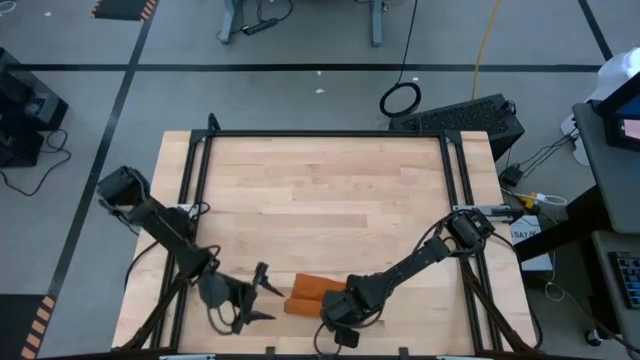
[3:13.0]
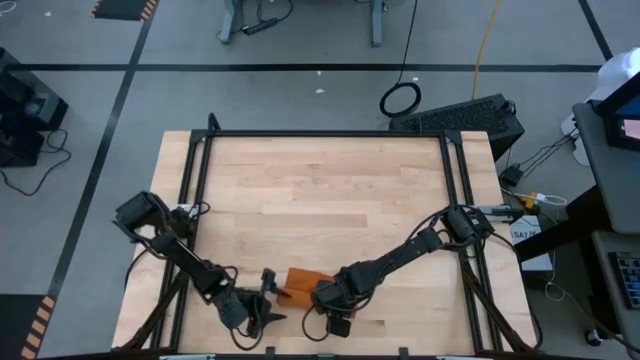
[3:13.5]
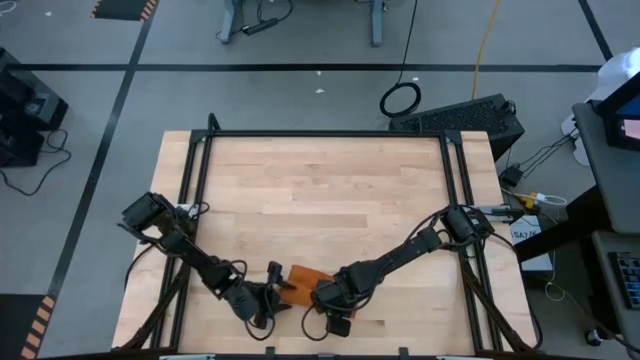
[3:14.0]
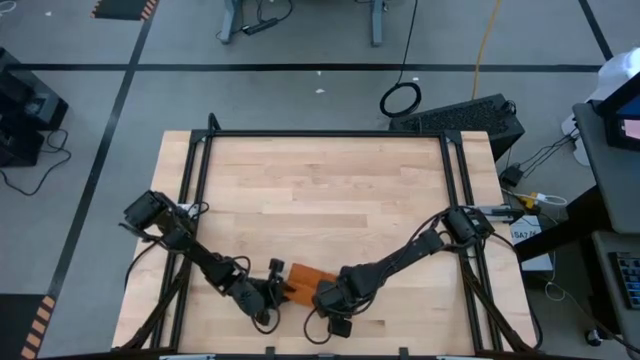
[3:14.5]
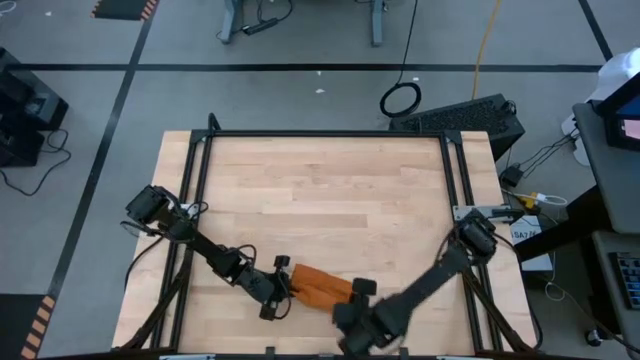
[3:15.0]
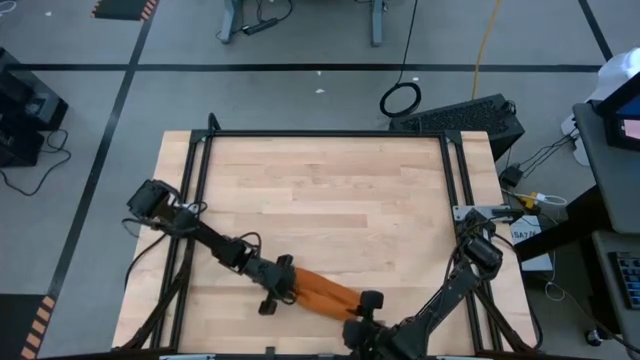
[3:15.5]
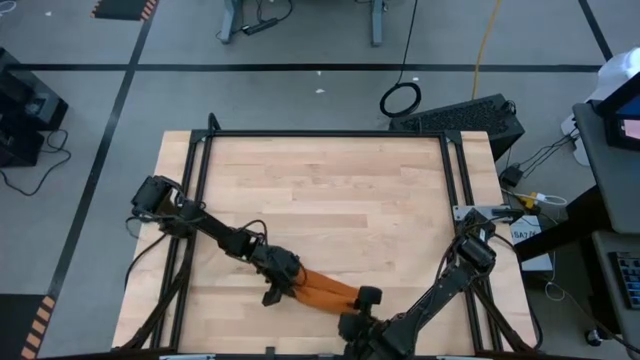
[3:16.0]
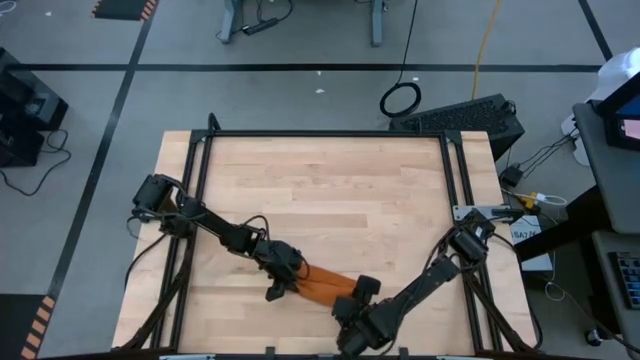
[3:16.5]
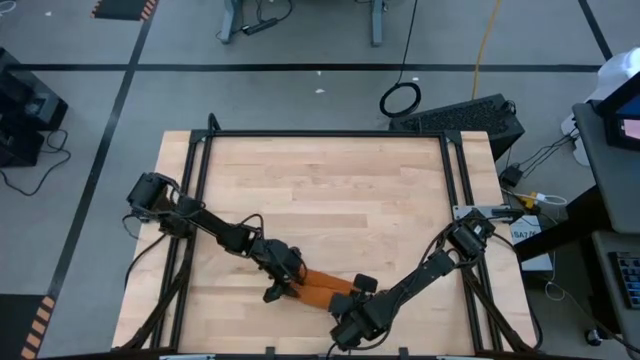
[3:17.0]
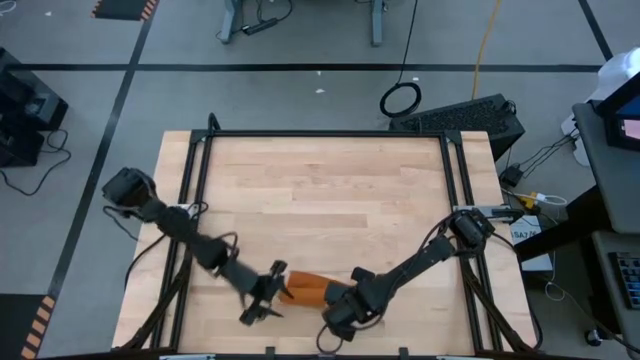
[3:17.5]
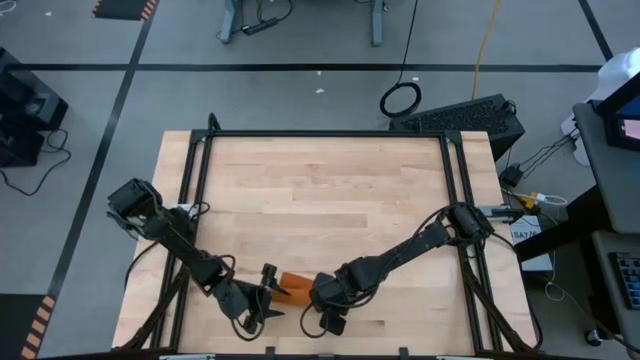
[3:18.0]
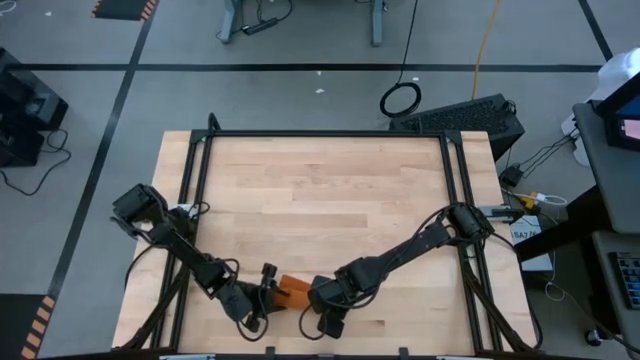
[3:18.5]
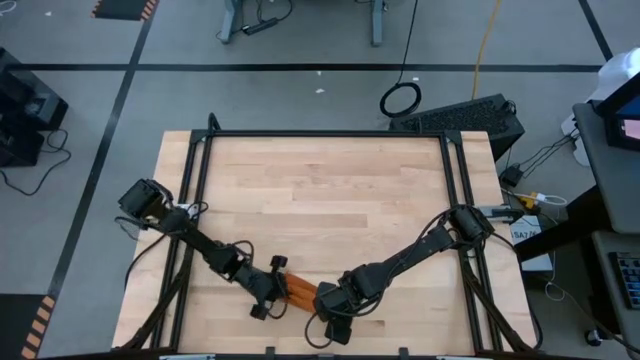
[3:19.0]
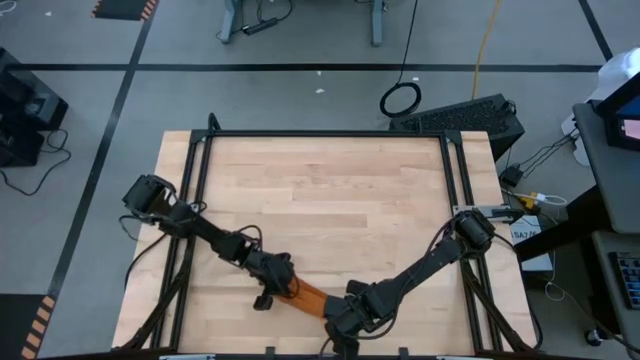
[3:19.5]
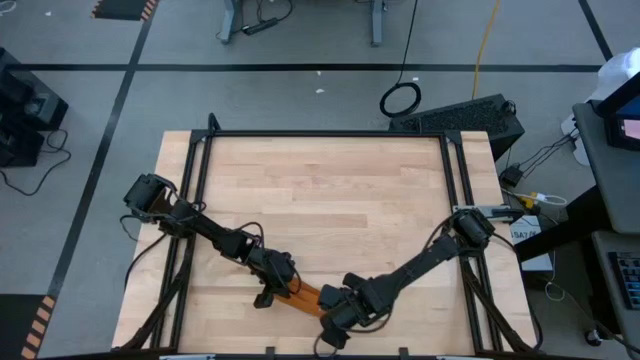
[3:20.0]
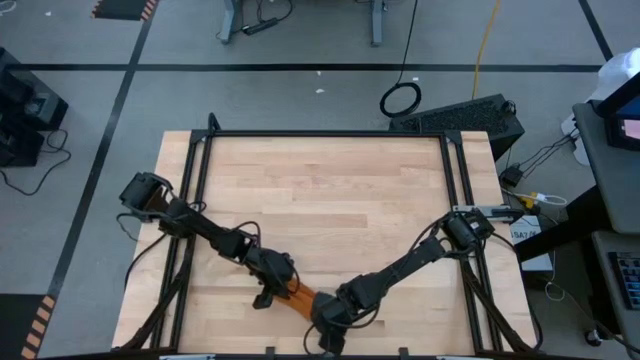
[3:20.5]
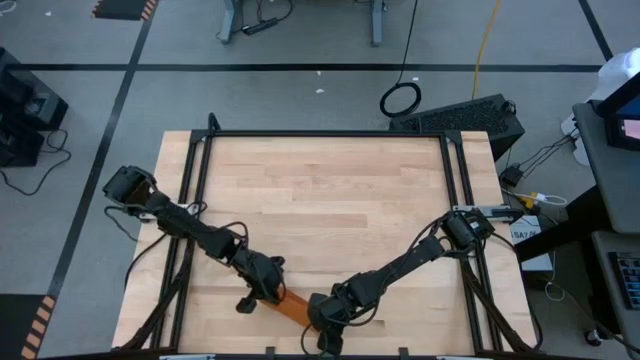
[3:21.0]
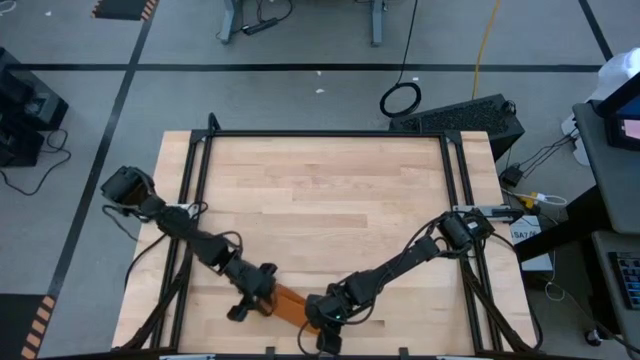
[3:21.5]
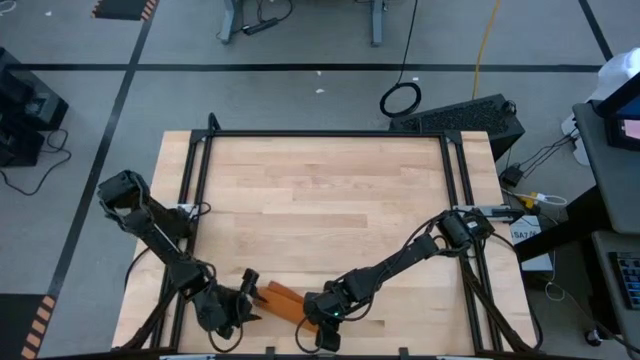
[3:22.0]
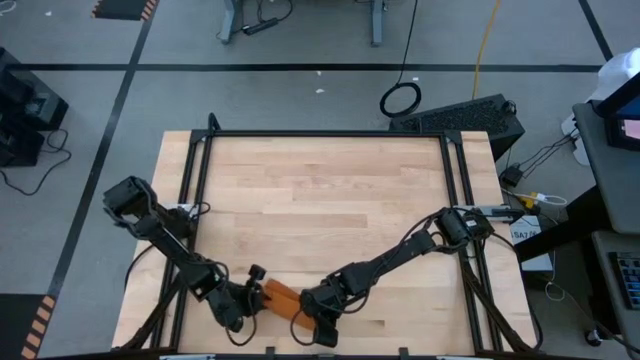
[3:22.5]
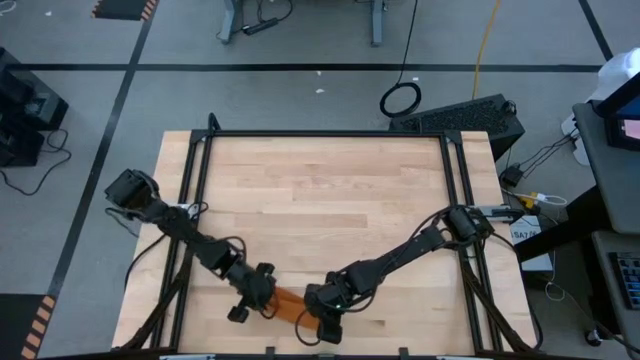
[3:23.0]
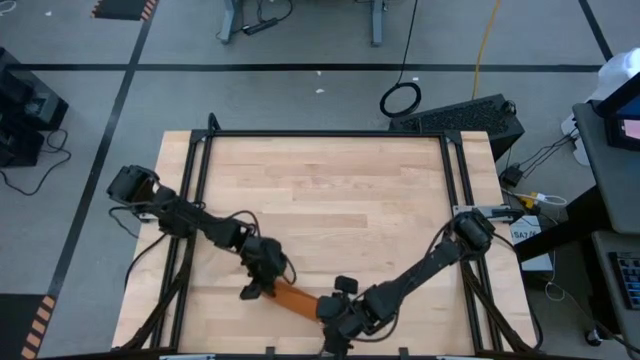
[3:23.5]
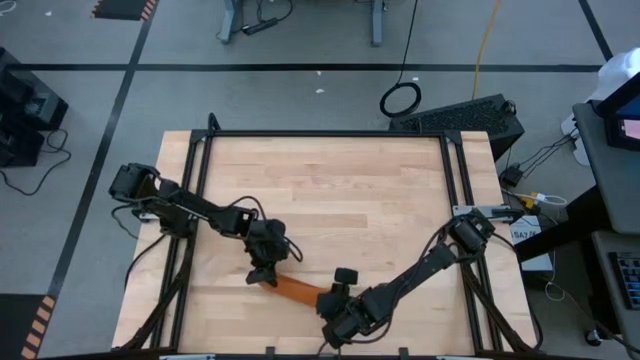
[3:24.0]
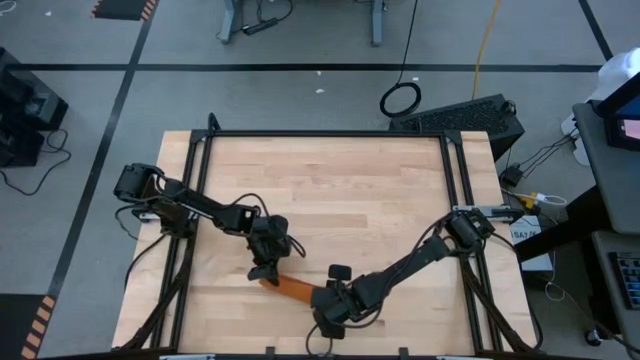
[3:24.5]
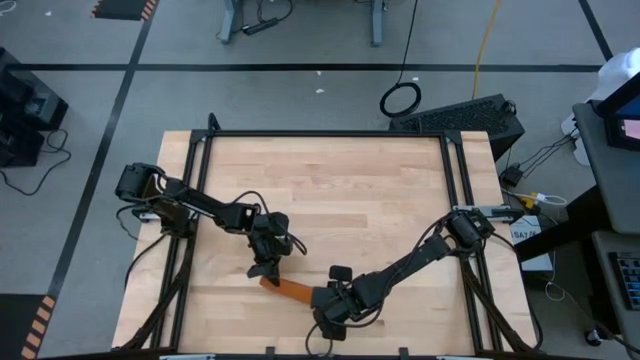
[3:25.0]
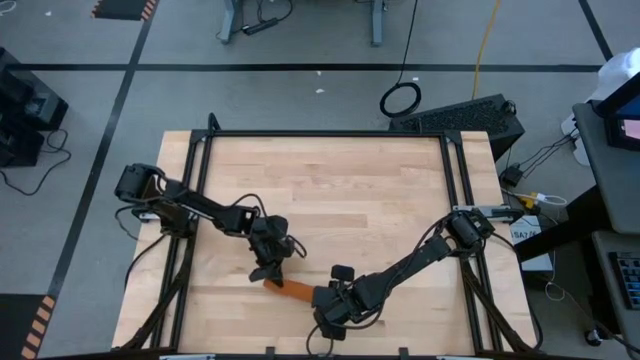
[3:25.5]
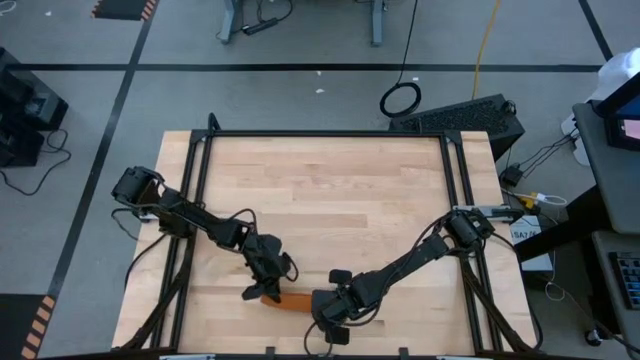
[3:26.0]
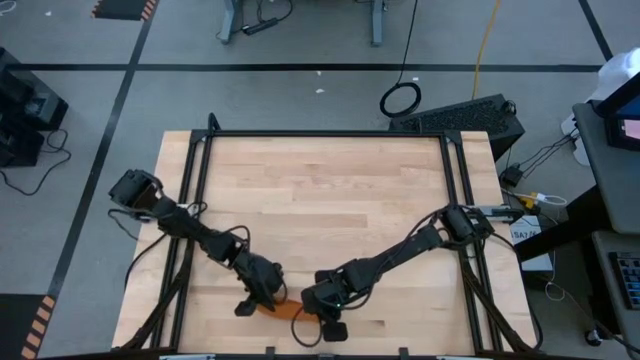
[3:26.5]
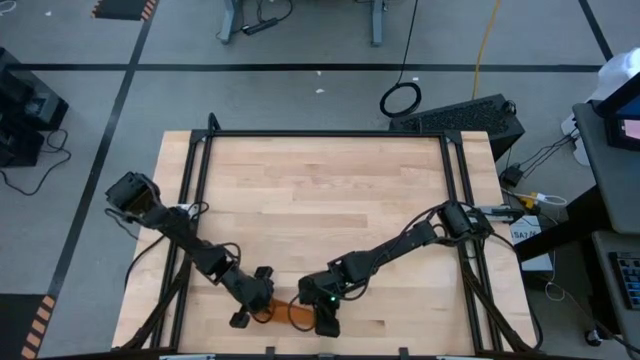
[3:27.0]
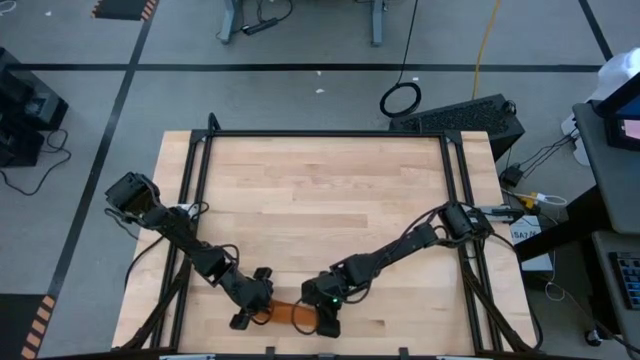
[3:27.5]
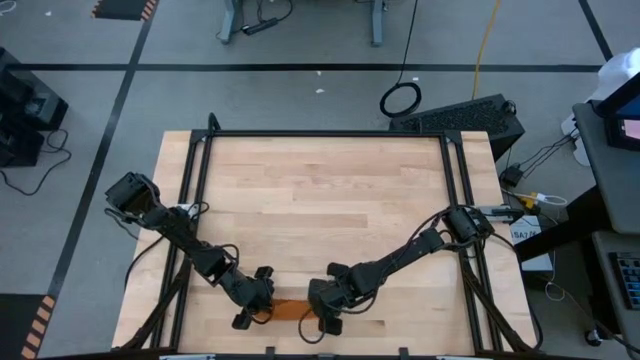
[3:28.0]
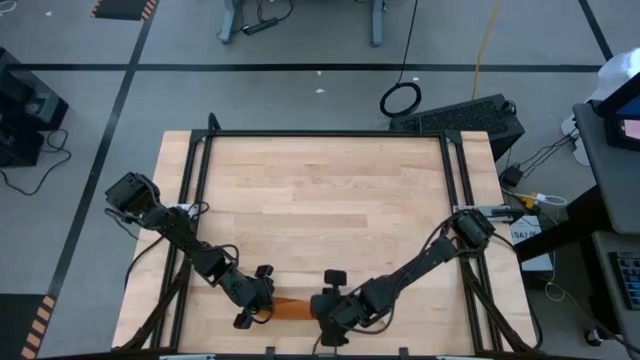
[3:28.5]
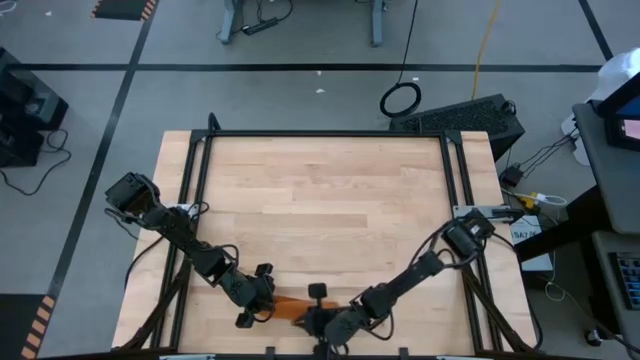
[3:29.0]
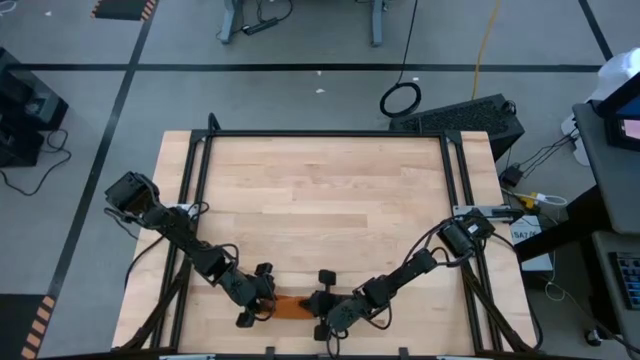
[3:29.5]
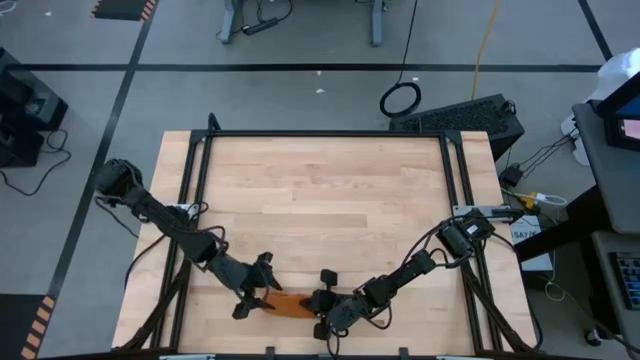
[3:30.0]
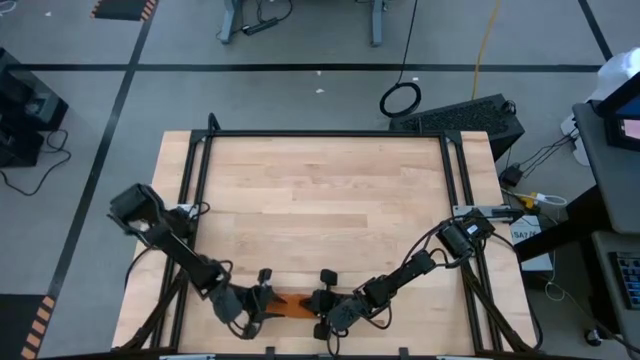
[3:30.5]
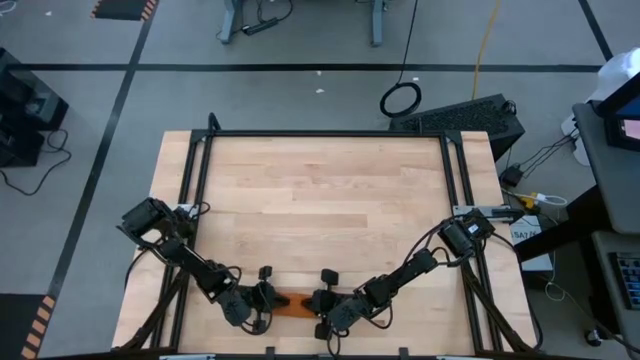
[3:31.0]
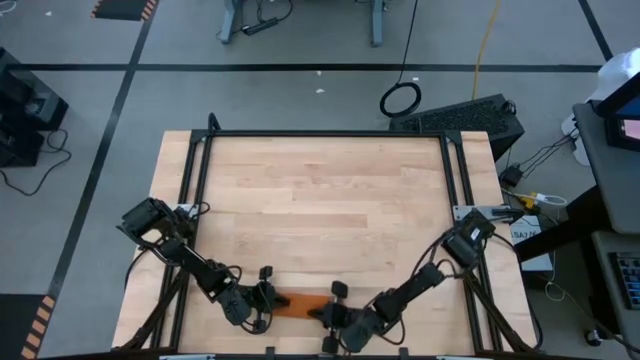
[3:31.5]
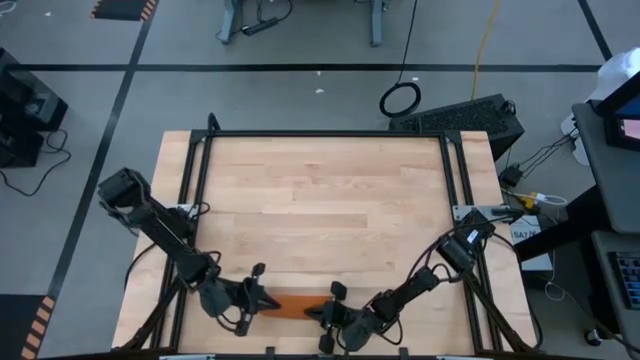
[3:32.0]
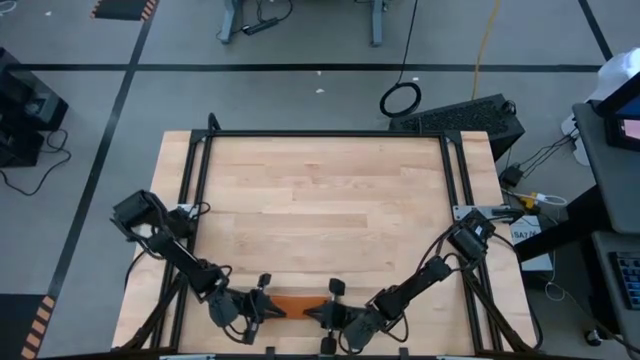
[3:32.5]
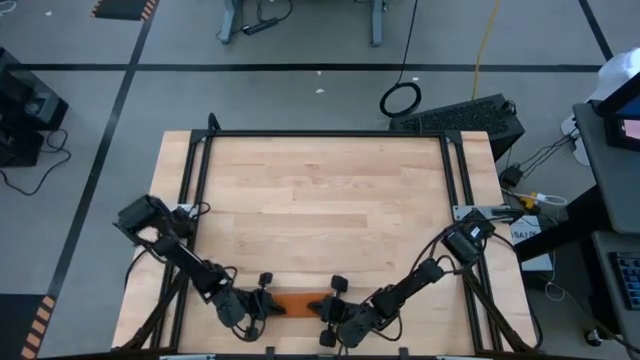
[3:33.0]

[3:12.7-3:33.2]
Task: Roll towel into tight, uniform cylinder
Roll the brown towel
